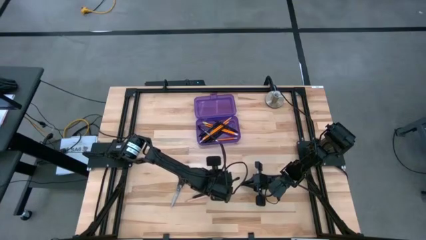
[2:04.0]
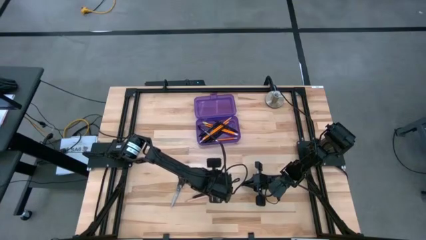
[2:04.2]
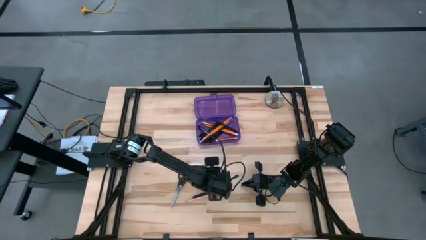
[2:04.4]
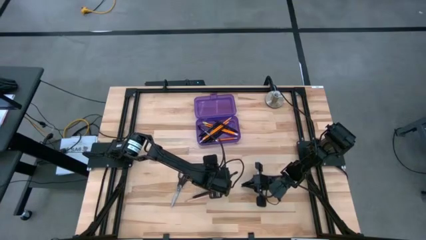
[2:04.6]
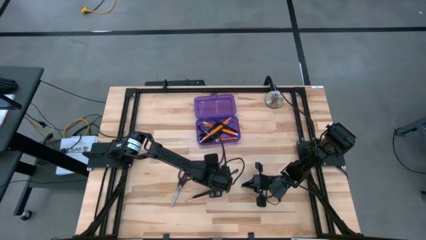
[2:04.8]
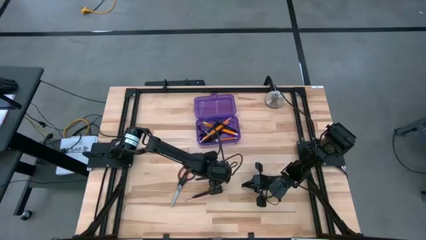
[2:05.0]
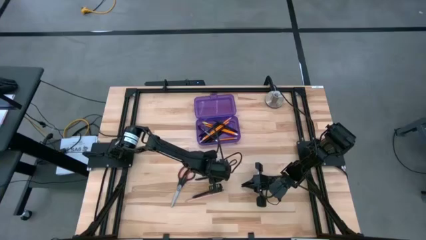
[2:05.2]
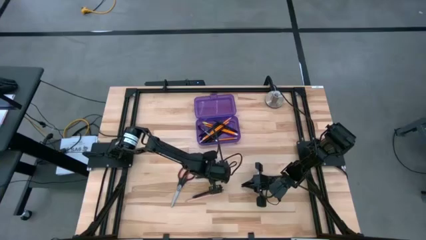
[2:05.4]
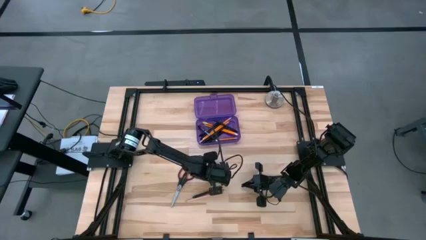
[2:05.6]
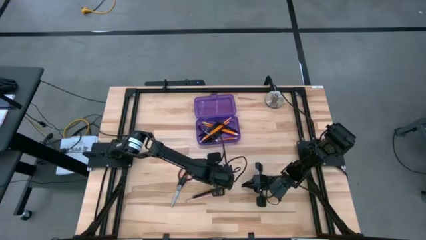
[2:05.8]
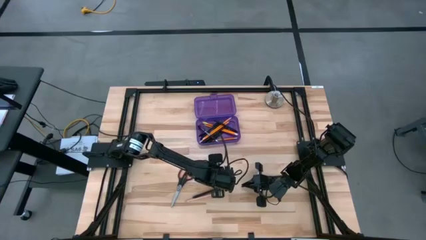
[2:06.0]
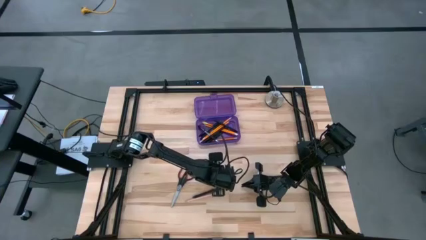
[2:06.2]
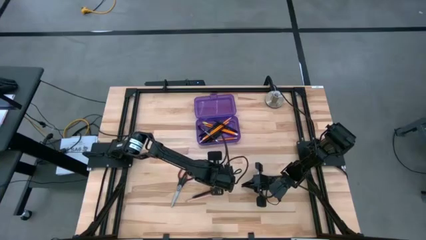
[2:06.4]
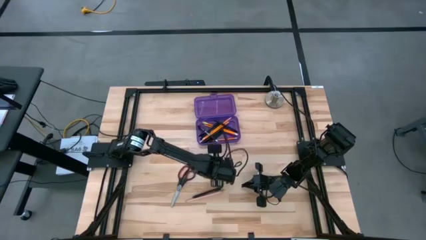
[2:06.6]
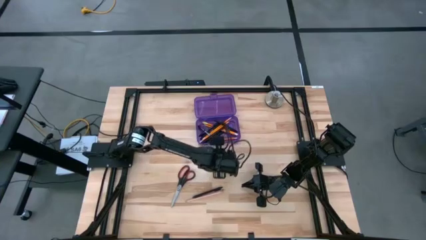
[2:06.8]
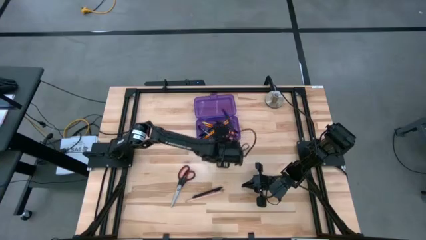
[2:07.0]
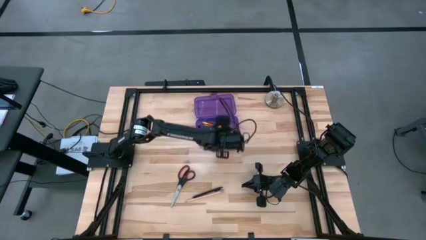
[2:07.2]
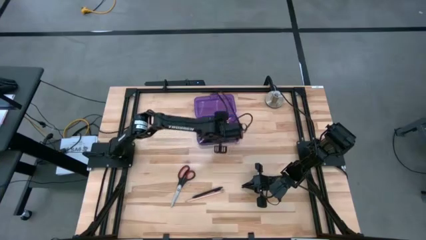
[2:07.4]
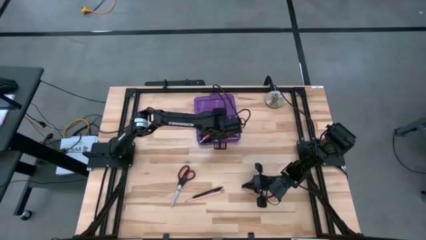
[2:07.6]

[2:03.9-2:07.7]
Task: Pick & place school supplies into a supply box
Put the black pen into the purple supply box

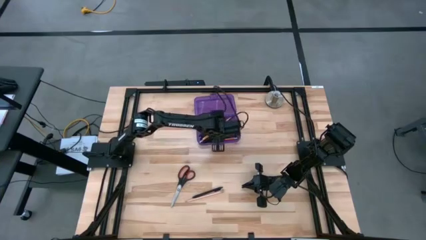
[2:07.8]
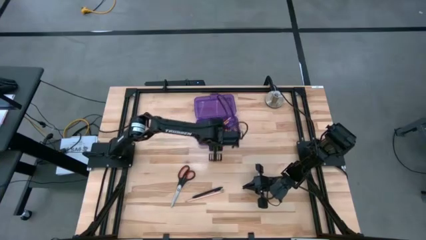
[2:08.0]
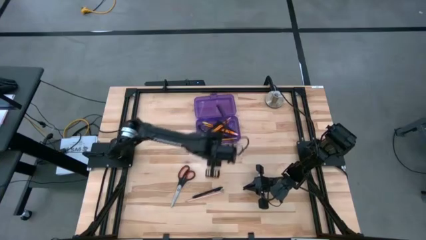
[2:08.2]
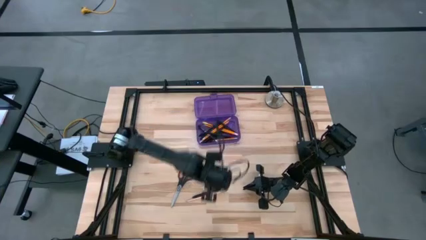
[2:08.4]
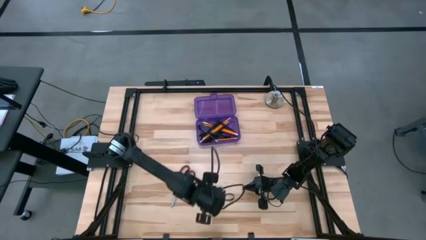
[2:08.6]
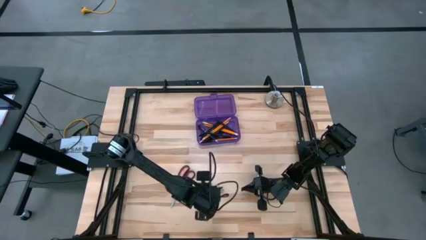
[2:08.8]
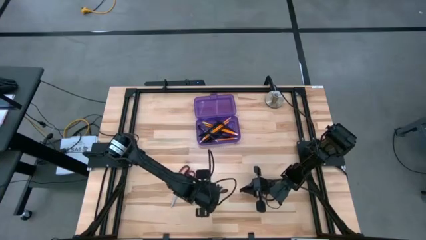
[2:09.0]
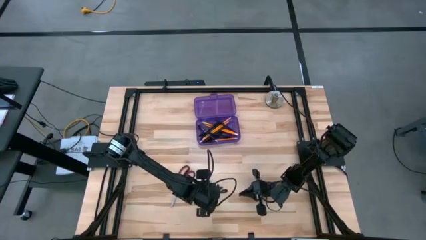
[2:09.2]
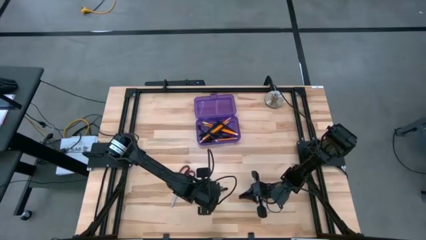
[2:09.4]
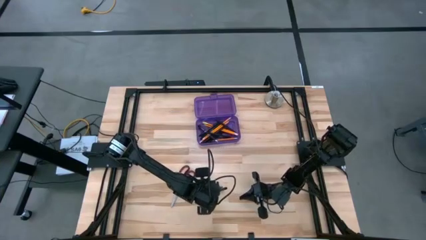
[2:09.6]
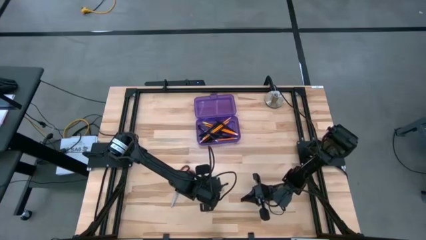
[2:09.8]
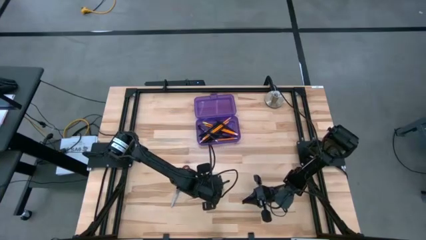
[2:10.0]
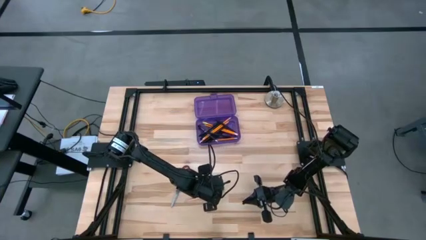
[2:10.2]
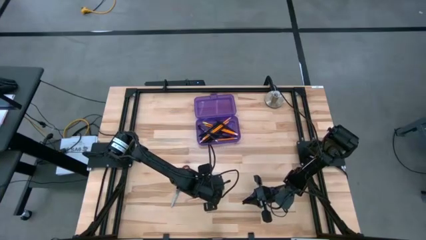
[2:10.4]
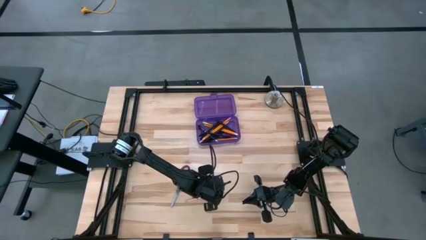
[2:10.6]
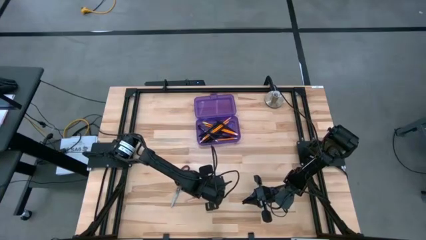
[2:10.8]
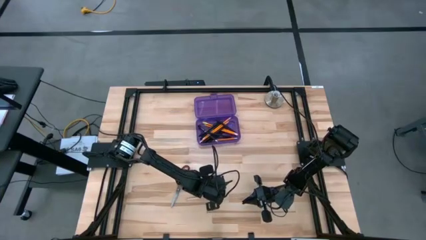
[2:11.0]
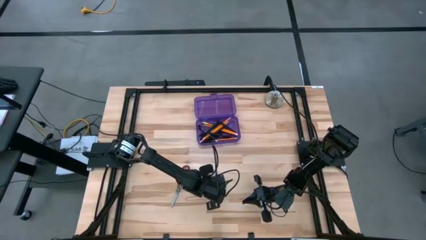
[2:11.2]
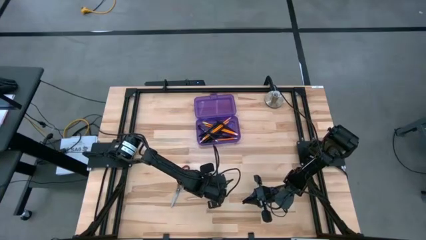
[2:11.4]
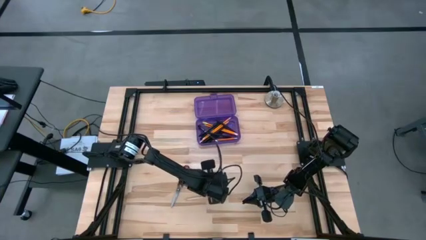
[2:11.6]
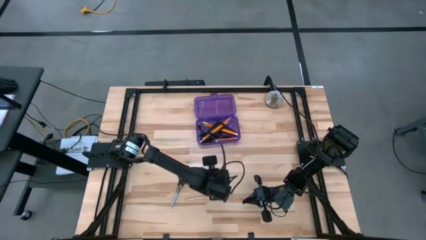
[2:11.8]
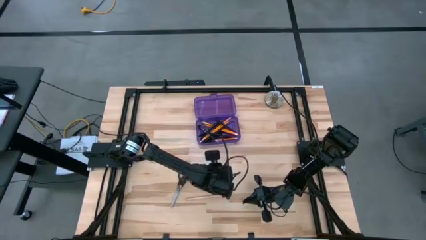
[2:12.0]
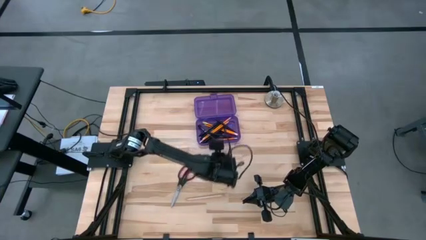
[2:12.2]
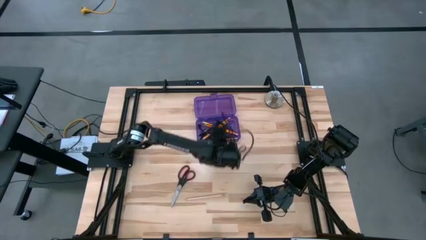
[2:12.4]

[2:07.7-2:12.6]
Put the black pen into the purple supply box

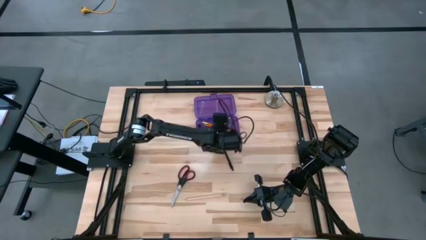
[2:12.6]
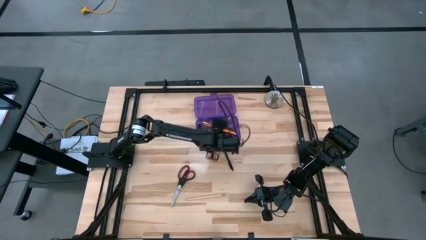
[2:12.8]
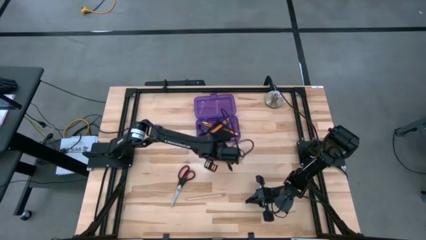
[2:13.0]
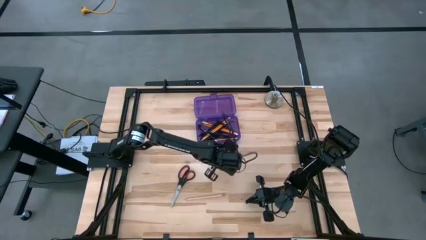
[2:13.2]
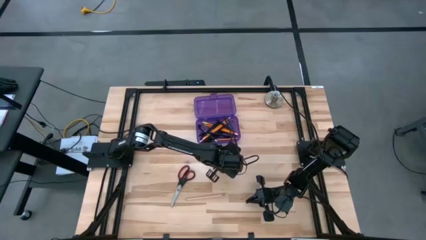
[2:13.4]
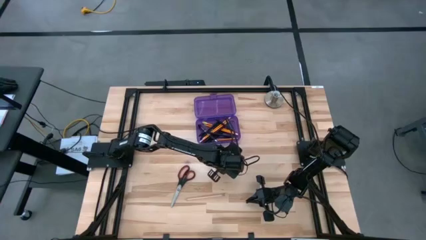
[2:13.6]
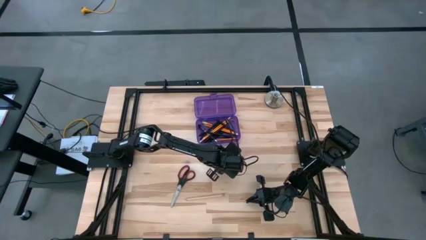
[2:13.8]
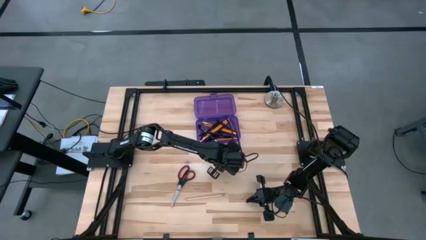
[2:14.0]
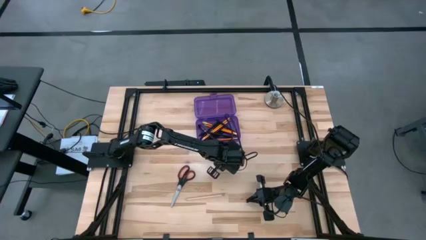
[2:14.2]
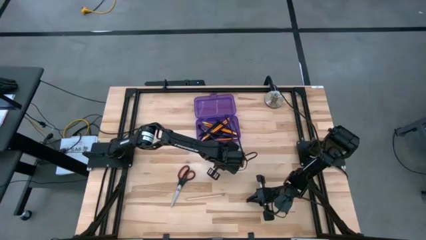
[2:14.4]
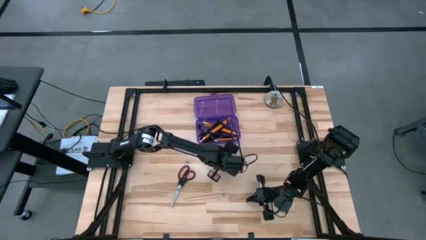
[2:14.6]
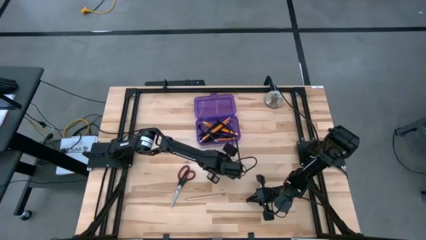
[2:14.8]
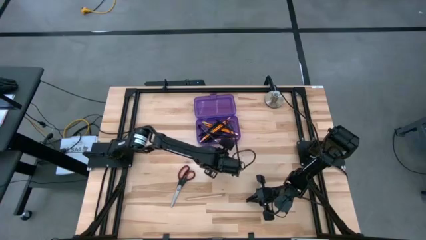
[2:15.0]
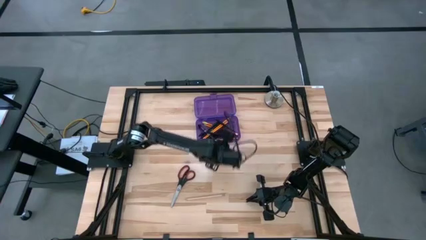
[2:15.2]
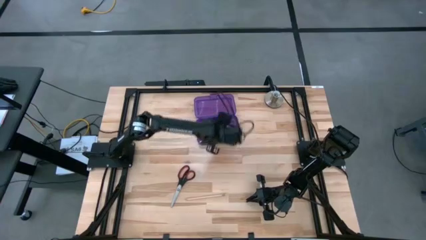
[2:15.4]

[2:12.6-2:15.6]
Put the black pen into the purple supply box

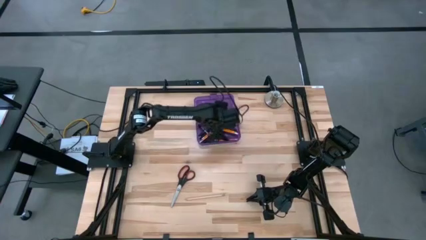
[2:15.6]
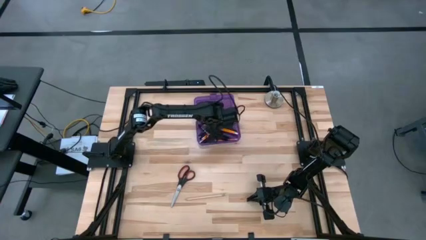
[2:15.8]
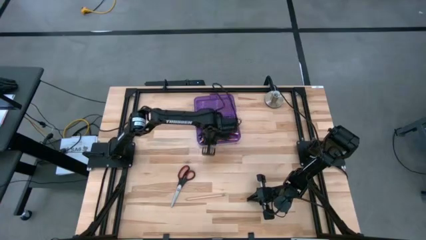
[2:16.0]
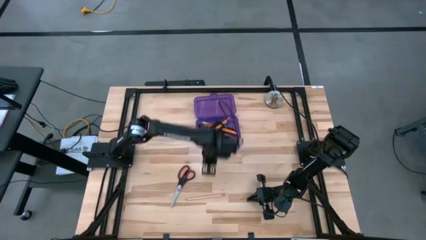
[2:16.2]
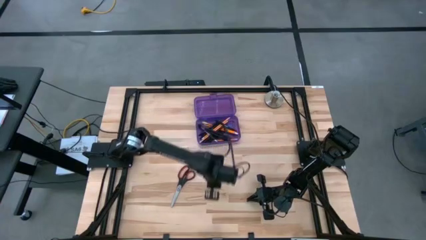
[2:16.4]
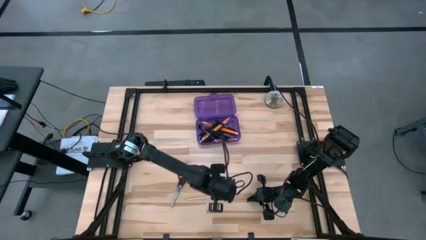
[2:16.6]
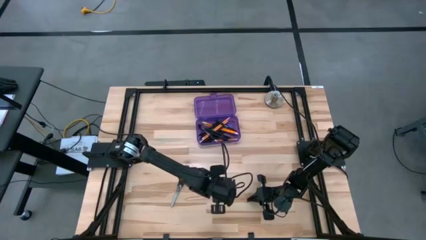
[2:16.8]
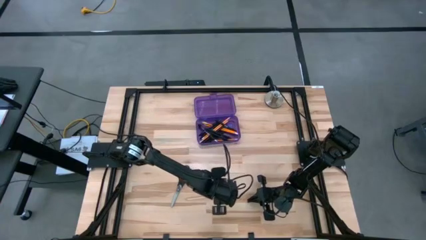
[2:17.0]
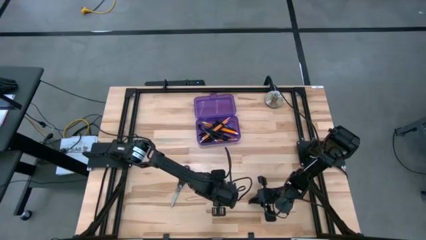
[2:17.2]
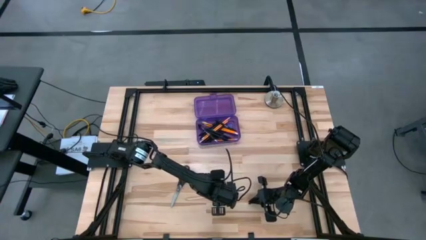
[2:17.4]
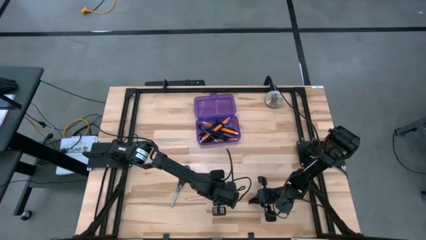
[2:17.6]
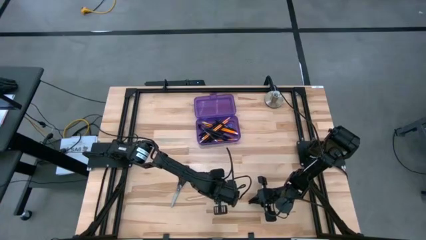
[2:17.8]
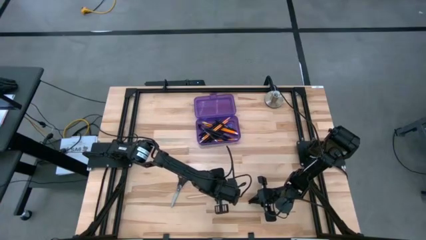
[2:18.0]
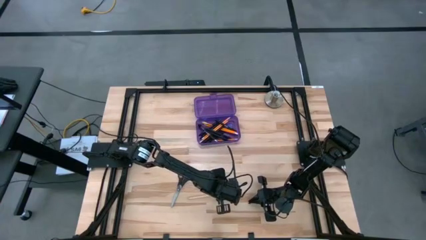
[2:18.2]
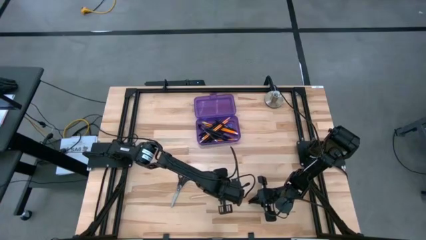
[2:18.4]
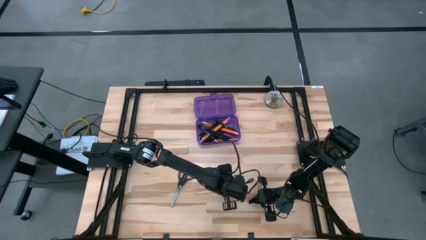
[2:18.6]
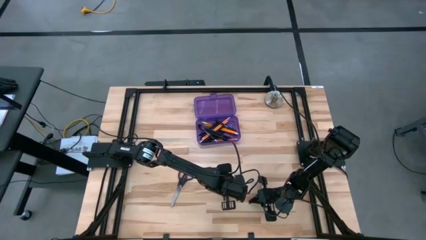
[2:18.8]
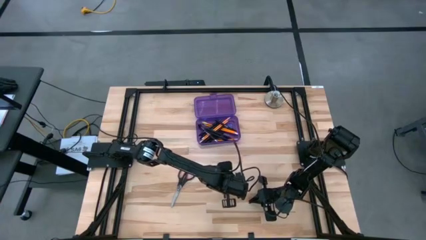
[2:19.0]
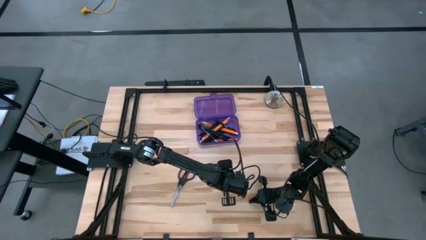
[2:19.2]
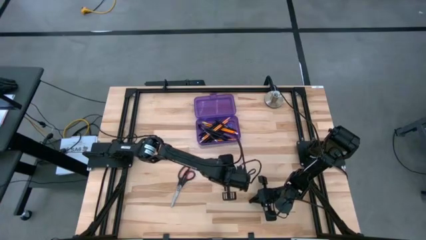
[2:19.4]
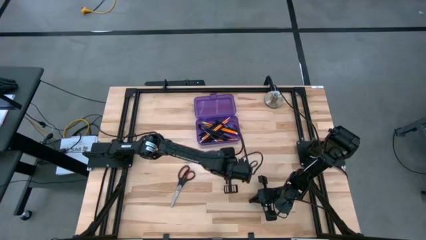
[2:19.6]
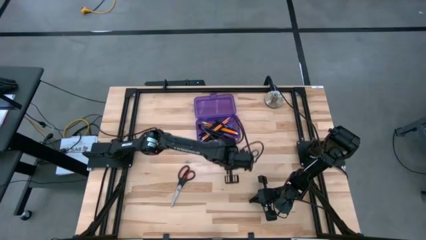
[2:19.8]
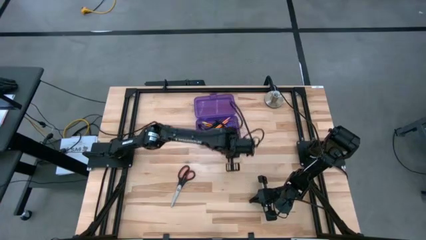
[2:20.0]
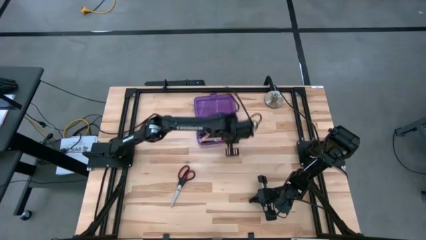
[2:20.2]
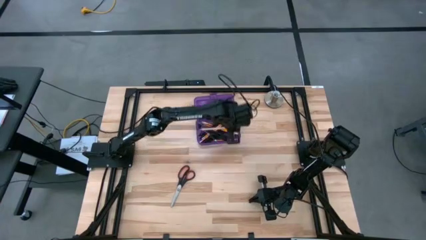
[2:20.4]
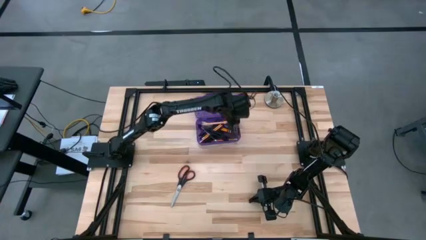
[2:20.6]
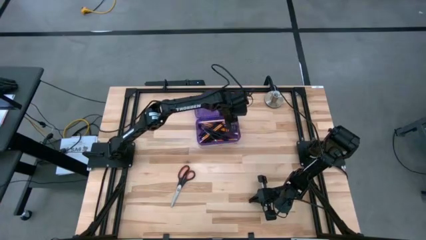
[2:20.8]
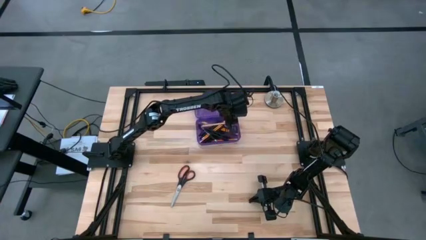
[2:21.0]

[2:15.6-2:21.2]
Put the white pencil into the purple supply box
